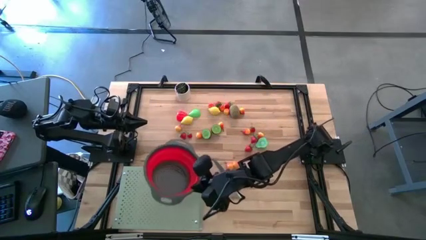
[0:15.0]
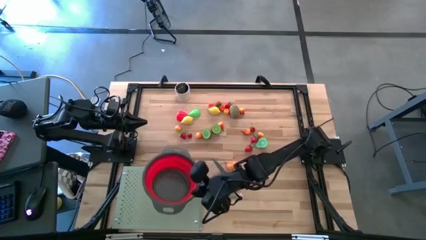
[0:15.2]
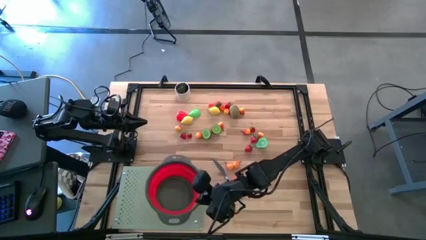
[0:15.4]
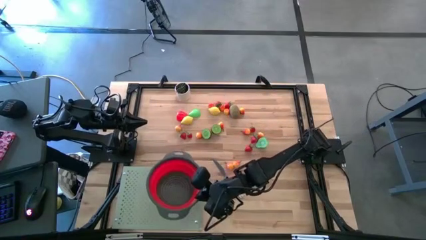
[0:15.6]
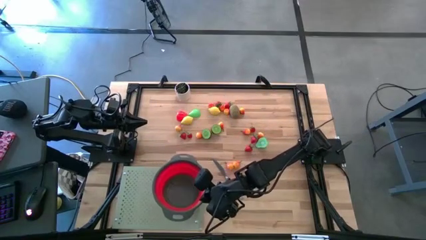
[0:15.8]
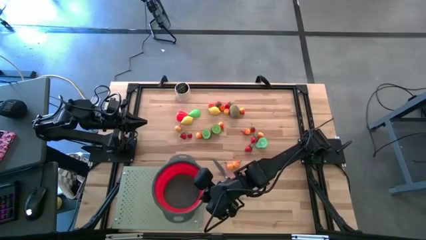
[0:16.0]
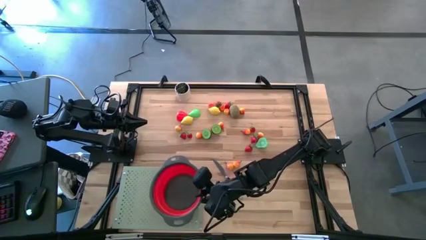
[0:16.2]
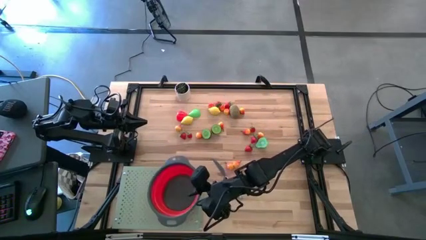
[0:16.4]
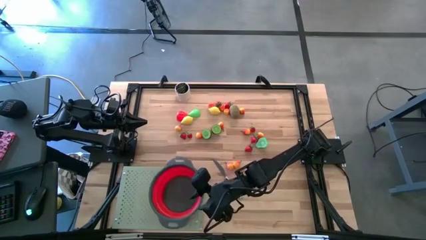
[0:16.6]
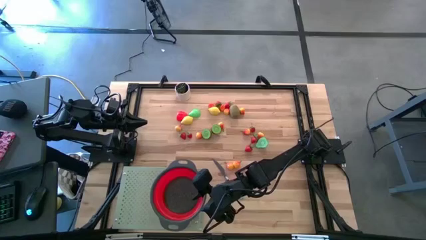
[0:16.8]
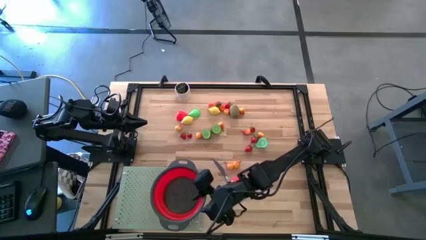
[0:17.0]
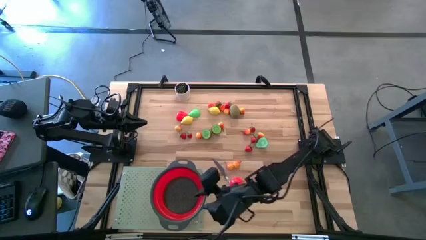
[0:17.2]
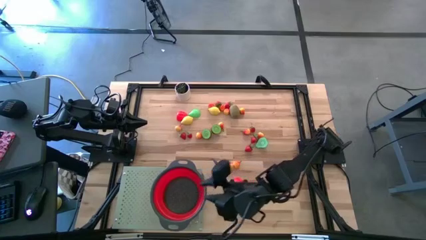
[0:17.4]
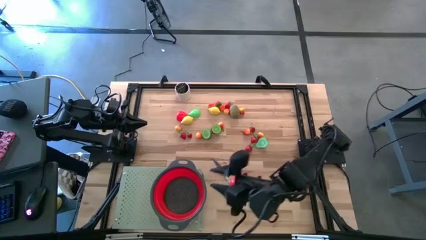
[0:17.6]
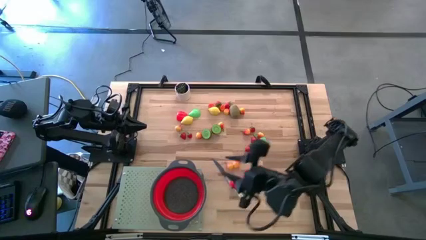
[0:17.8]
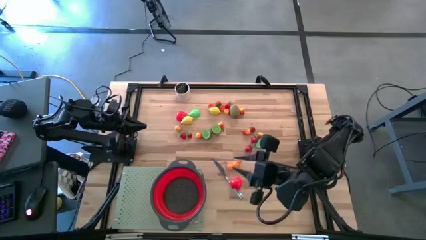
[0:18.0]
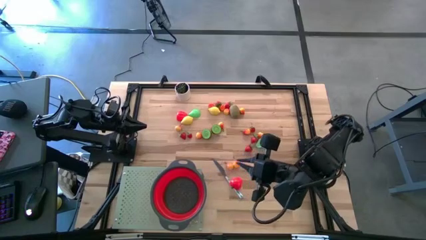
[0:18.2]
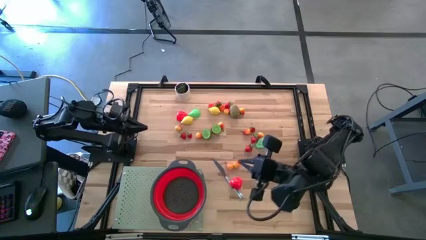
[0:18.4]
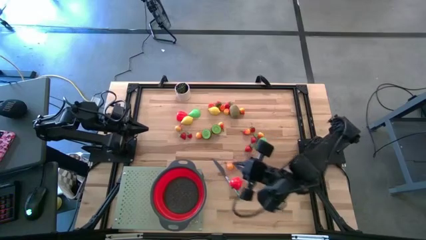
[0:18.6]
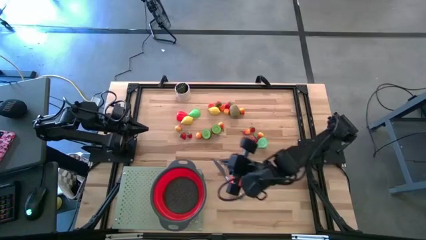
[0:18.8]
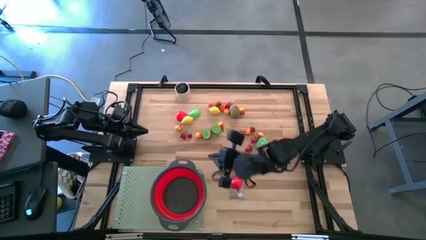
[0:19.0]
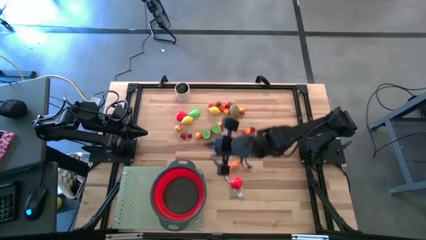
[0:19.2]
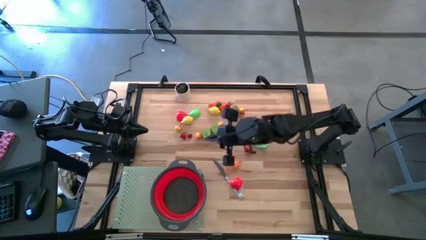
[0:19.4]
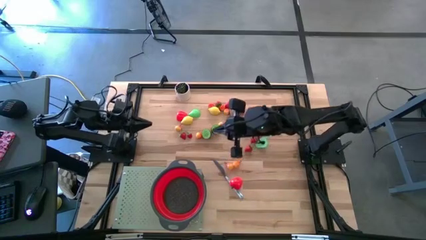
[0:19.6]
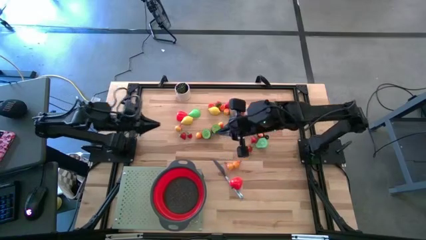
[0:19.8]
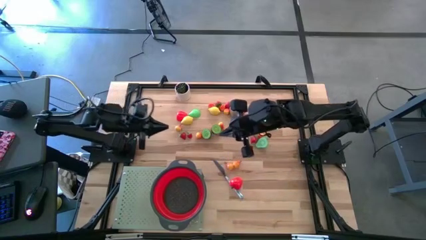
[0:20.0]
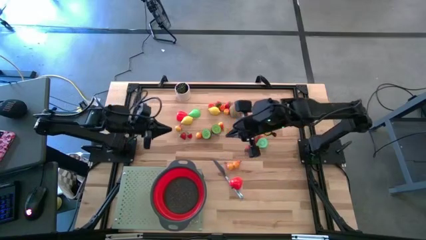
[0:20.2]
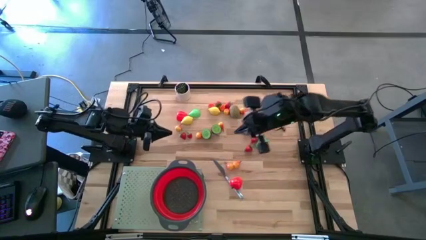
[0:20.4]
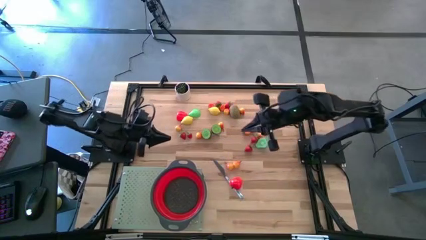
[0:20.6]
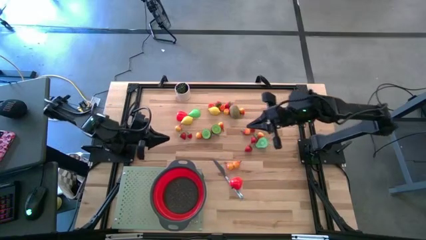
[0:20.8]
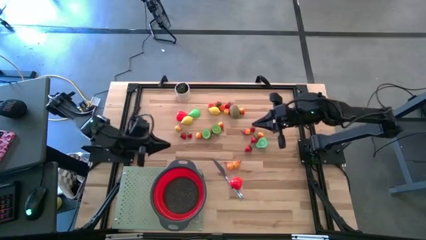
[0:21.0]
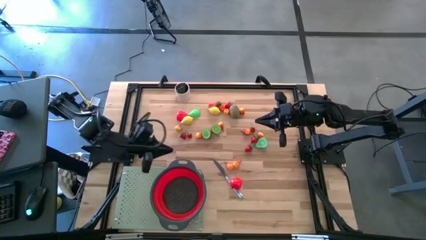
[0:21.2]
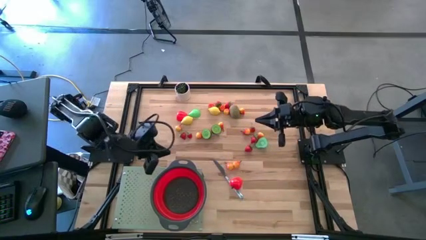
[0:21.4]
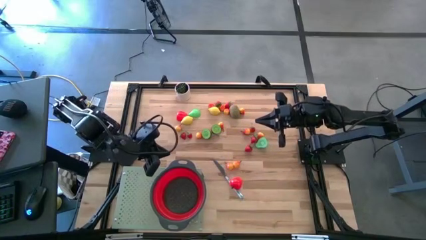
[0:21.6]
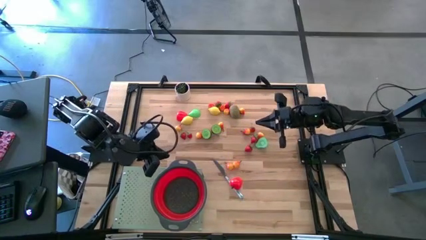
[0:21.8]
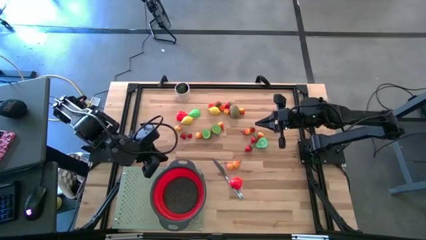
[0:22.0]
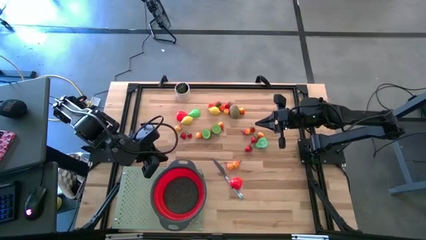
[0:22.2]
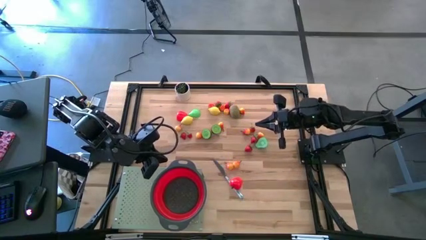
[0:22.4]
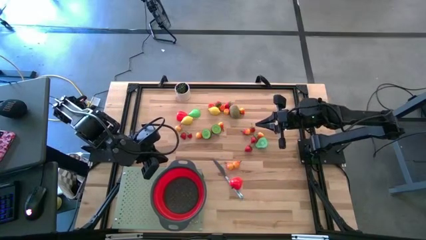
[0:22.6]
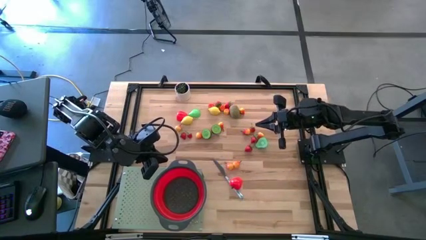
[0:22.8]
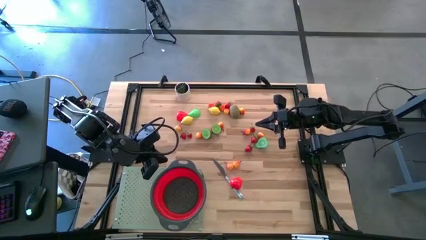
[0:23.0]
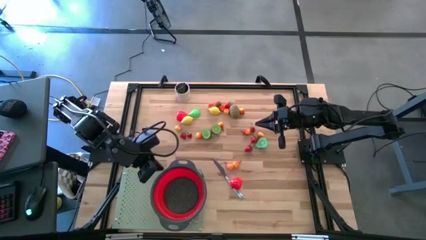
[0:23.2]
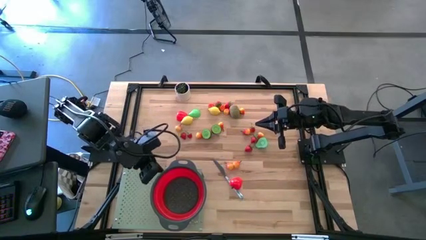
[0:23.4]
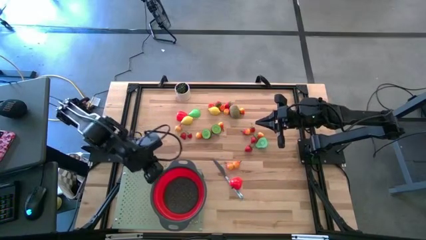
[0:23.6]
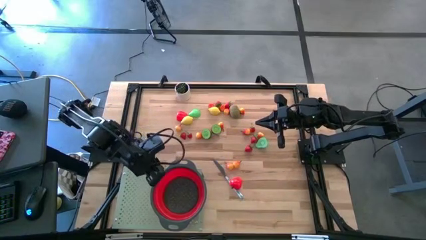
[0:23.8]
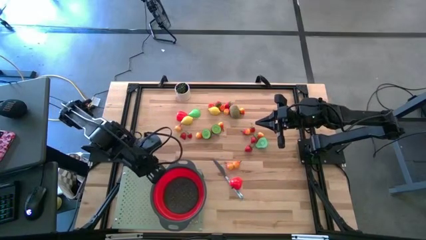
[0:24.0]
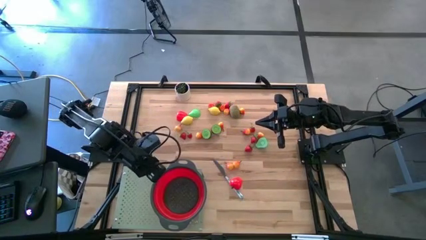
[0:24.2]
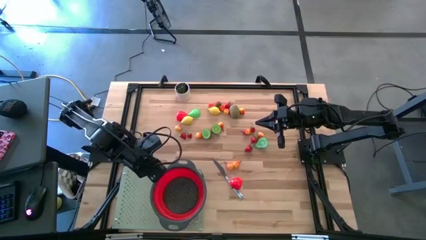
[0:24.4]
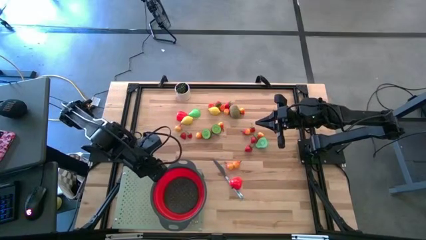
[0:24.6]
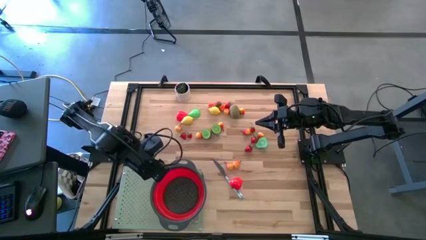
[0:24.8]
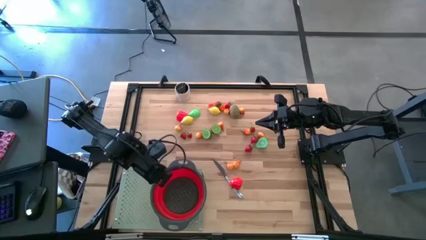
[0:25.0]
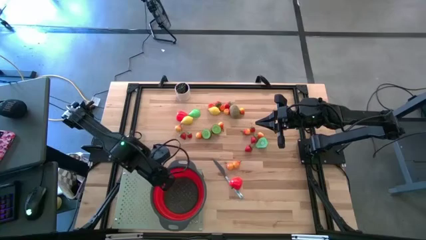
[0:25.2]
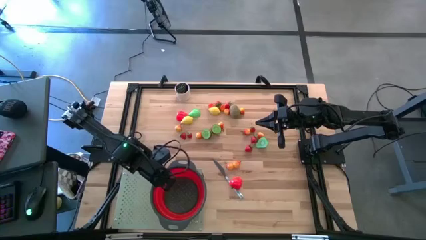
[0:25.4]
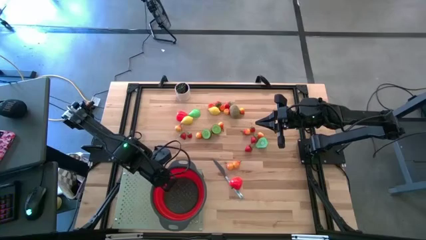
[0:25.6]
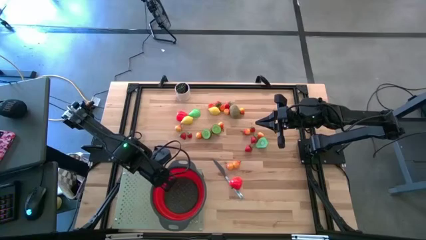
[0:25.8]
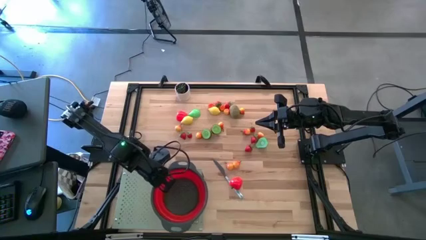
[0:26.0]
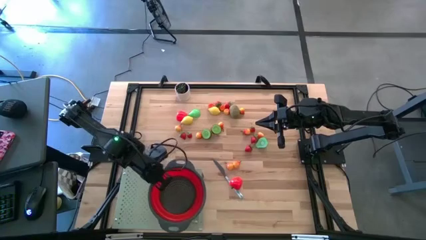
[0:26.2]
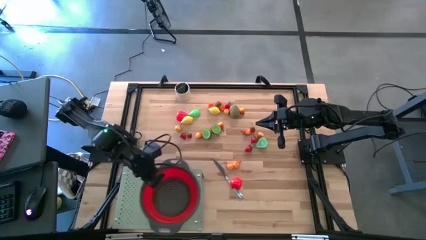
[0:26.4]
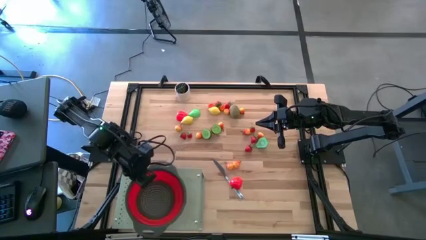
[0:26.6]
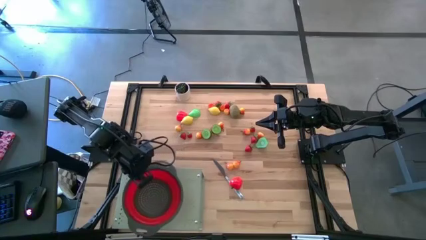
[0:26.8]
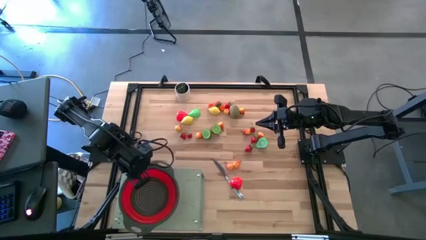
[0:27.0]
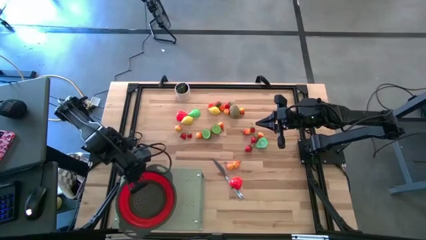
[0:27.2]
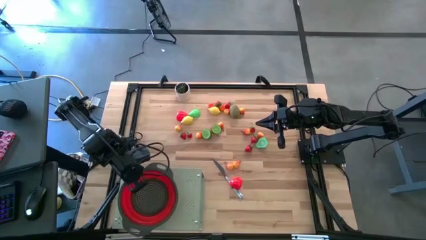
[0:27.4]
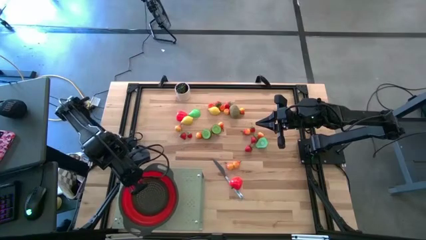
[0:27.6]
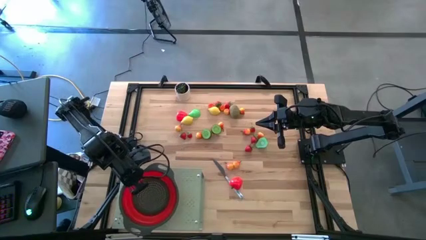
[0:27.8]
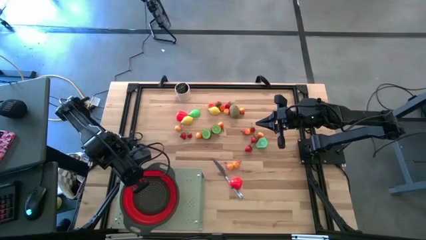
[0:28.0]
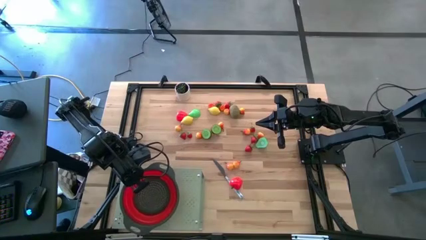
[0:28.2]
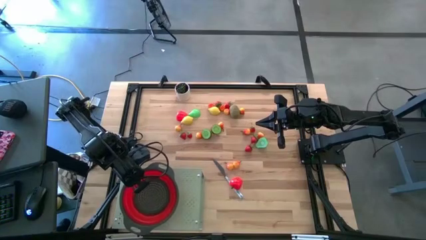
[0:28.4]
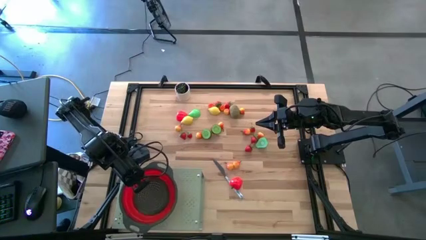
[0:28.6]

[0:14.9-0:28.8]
Task: Pick & Place Fruit
Put the red strainer bowl on the shelf
